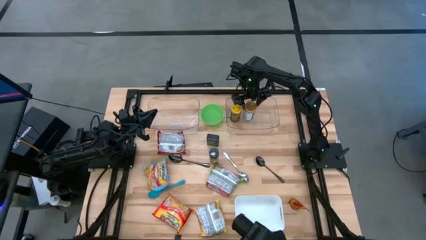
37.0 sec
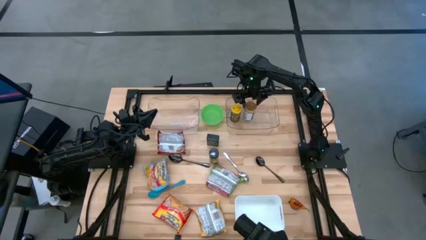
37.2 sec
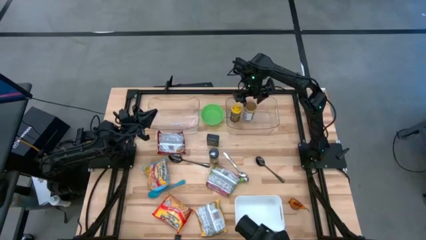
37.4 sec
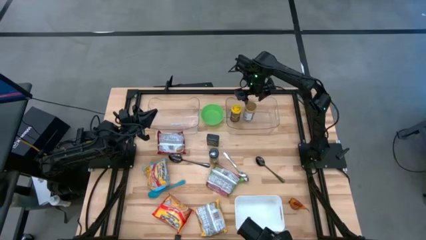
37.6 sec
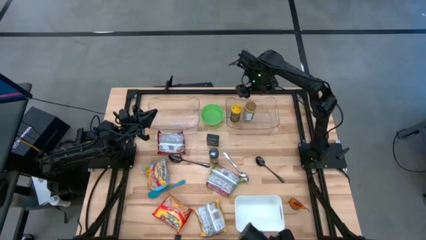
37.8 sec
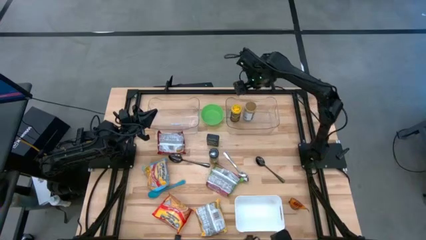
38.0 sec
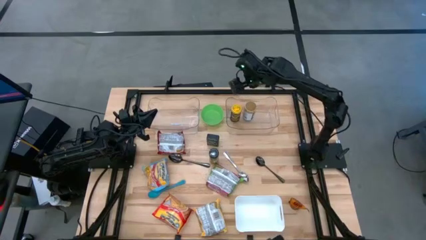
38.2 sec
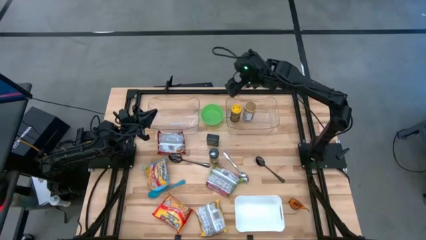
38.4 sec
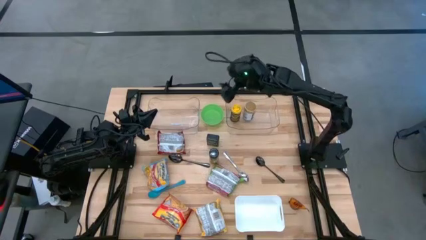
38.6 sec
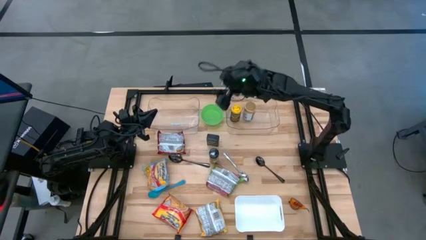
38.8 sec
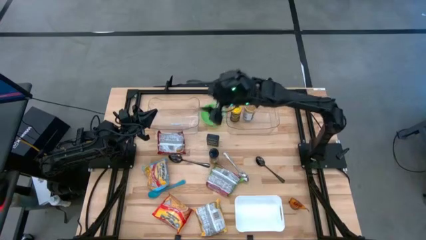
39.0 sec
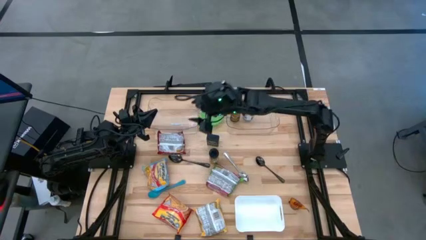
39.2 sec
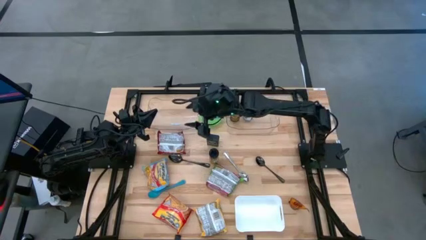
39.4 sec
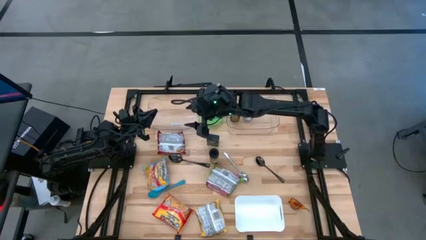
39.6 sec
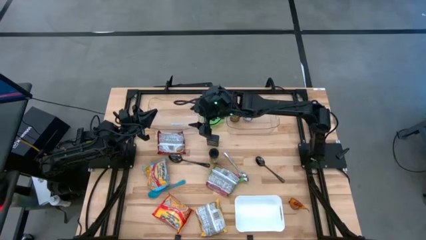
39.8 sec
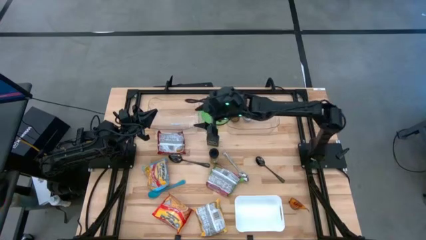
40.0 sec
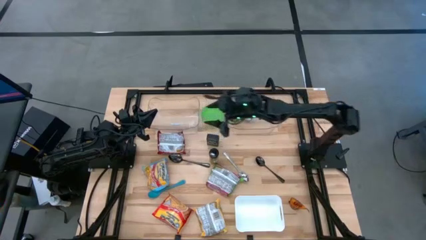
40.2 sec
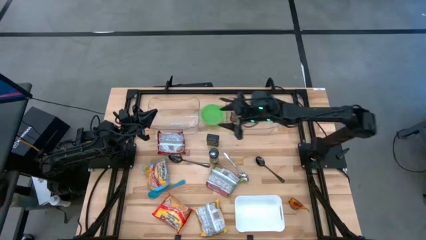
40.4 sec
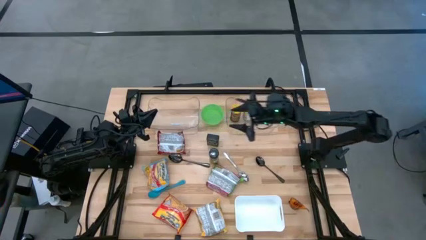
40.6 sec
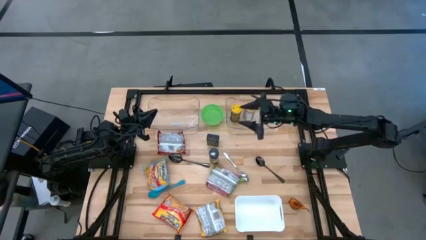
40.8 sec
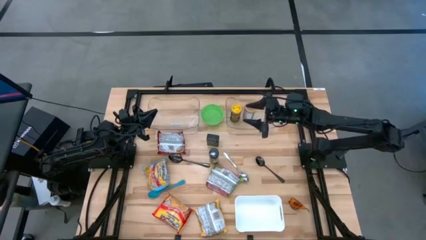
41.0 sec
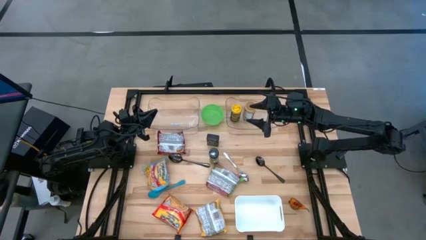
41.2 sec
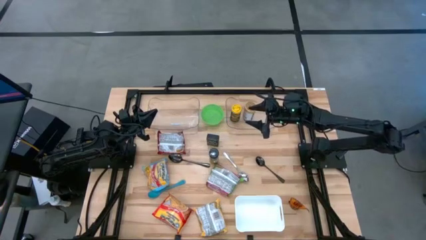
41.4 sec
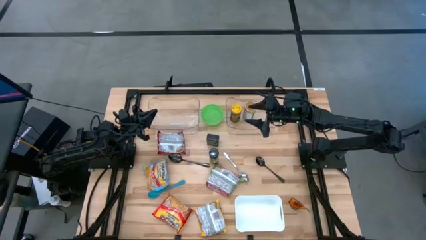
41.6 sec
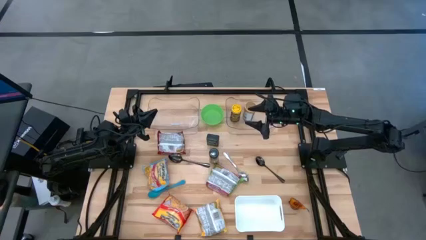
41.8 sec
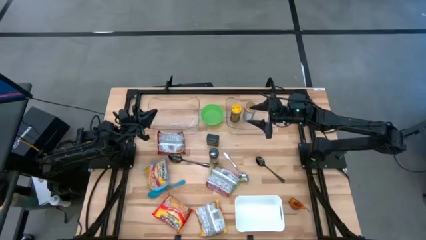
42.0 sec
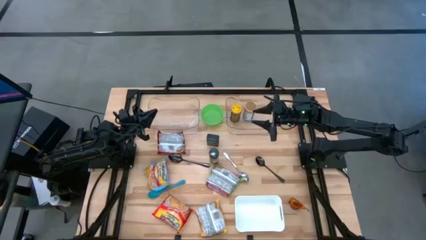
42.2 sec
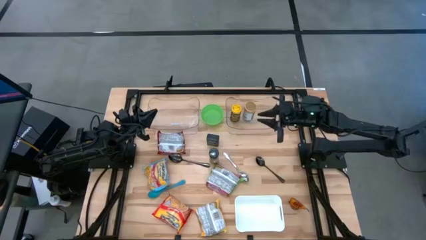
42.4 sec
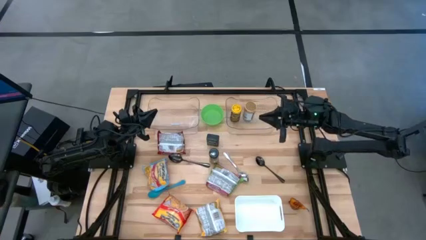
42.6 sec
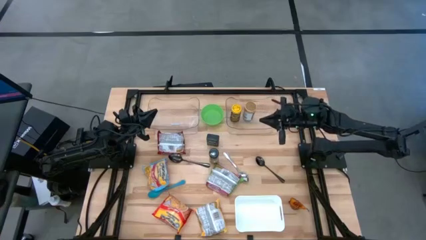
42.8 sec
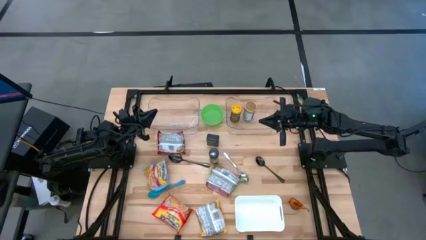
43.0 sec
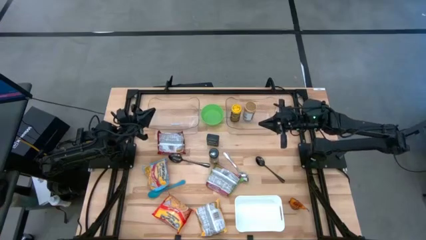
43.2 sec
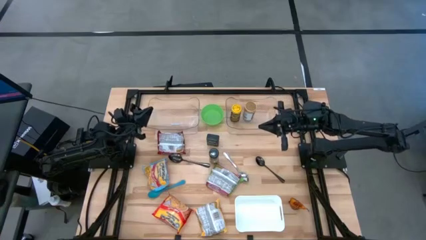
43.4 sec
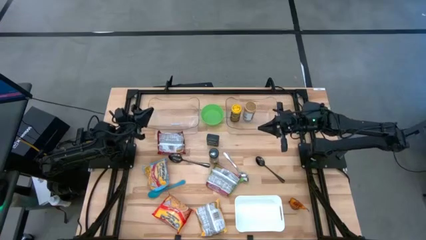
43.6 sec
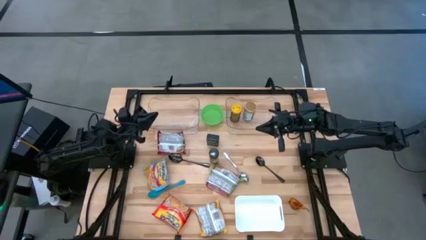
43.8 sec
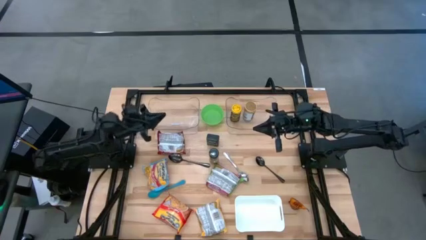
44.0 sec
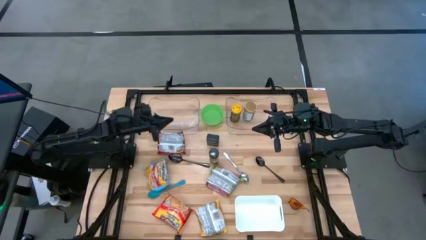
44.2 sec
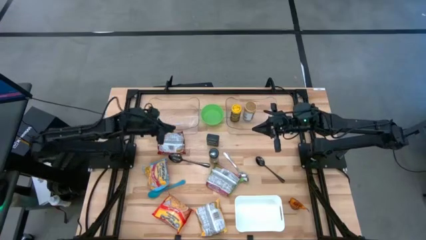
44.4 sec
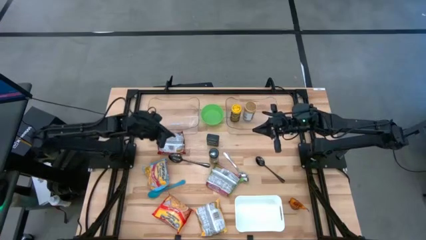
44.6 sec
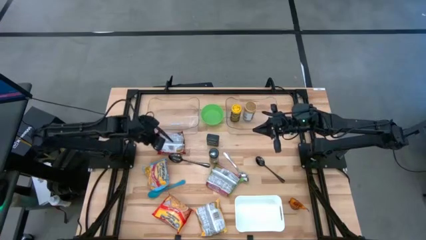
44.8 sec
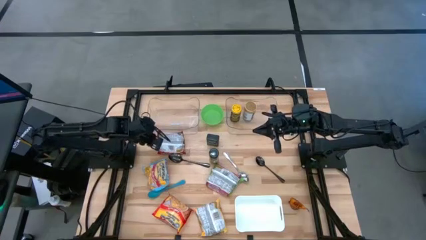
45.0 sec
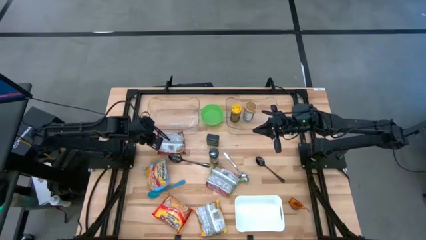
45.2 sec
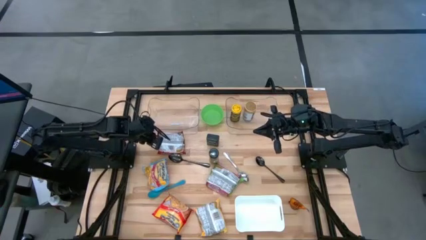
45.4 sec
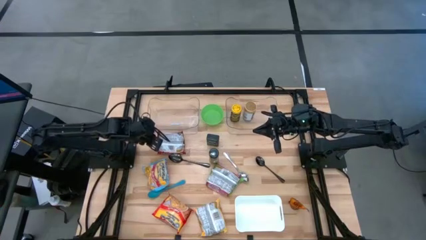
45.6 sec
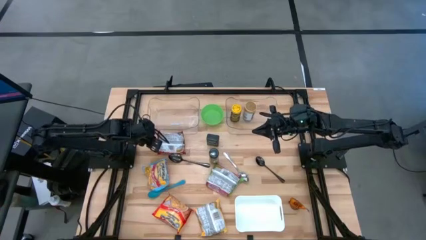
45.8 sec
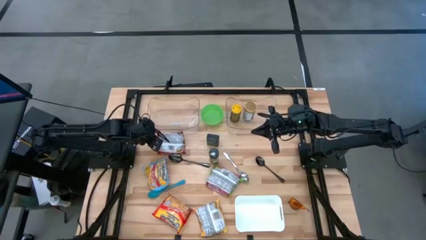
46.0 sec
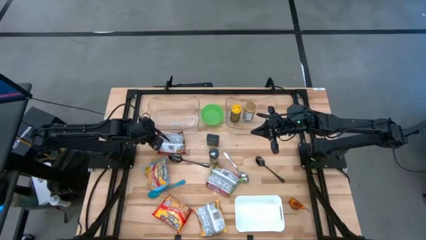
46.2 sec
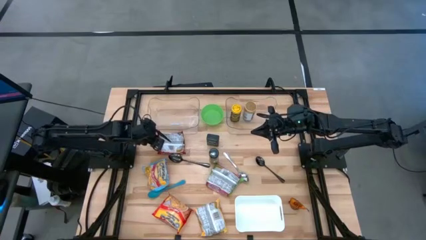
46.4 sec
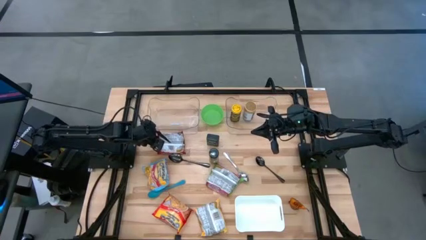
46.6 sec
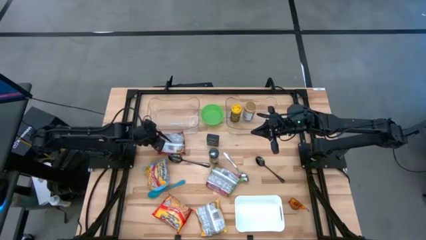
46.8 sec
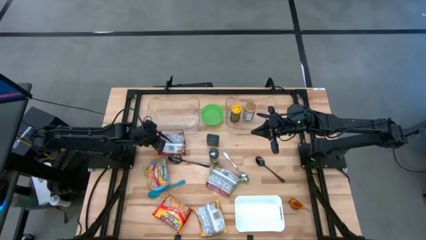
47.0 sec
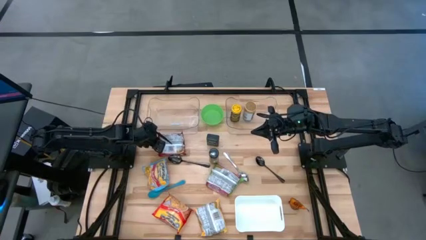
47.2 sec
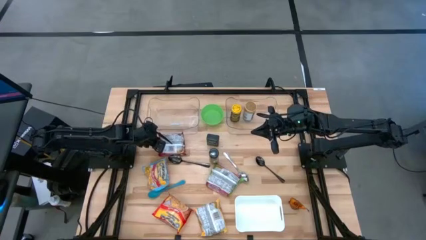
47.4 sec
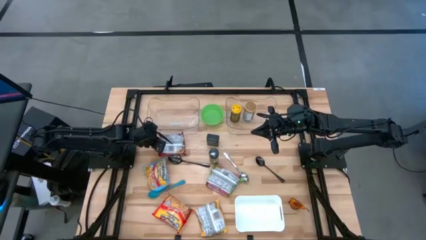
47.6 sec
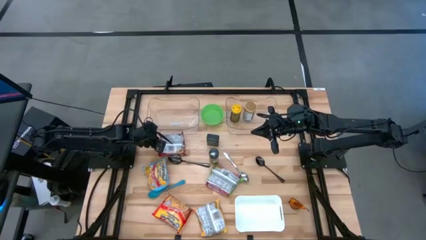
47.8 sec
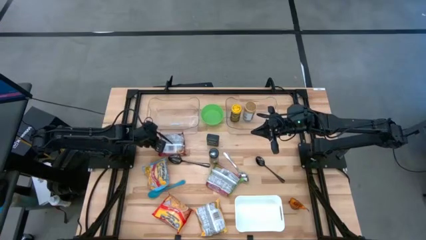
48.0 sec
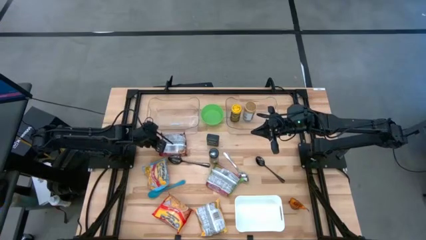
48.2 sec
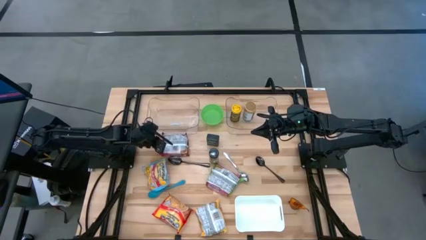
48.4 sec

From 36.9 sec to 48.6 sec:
Task: Pick & Place Food Item
Put the red noodle pack in the left transparent bin

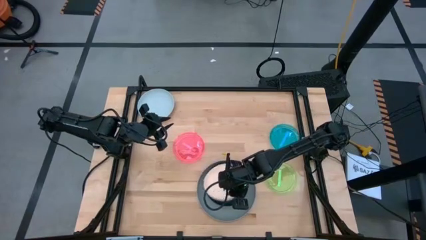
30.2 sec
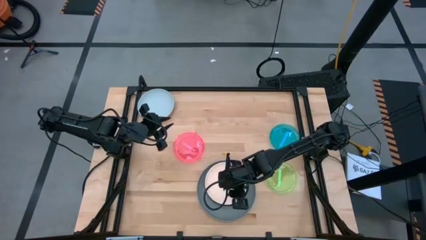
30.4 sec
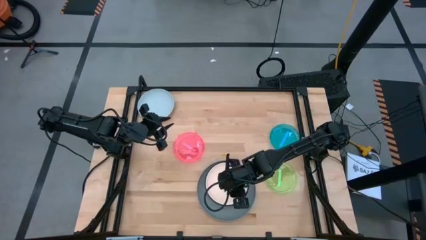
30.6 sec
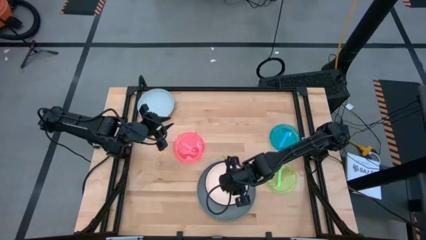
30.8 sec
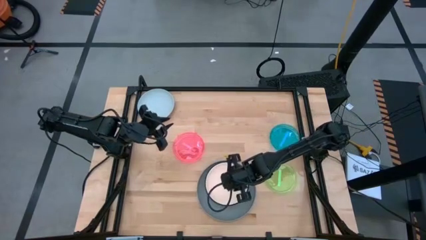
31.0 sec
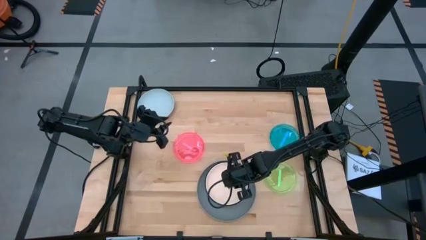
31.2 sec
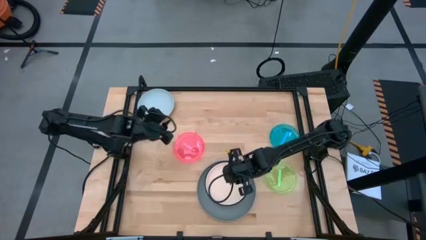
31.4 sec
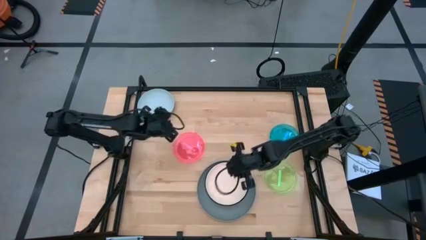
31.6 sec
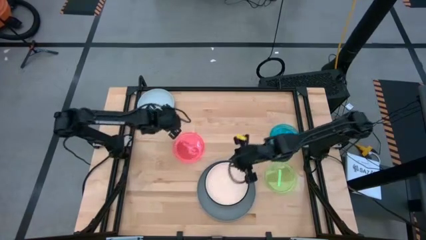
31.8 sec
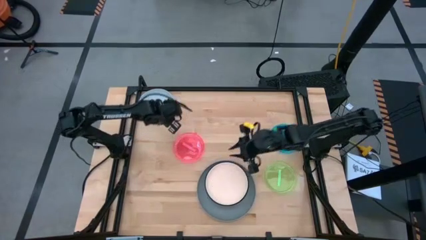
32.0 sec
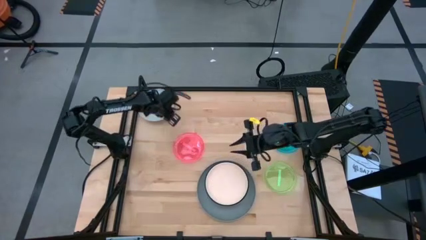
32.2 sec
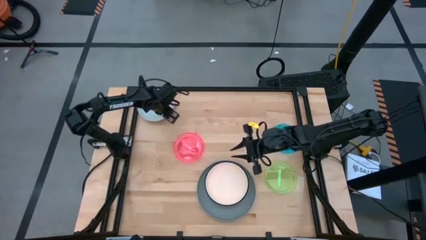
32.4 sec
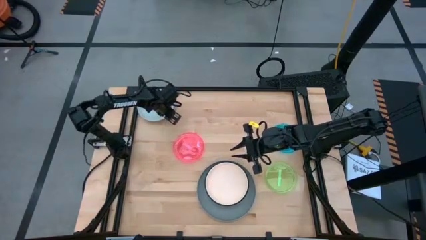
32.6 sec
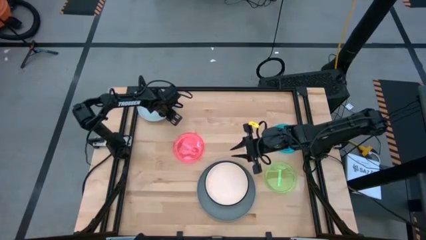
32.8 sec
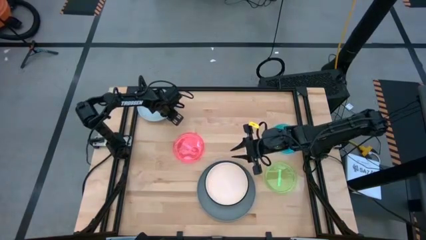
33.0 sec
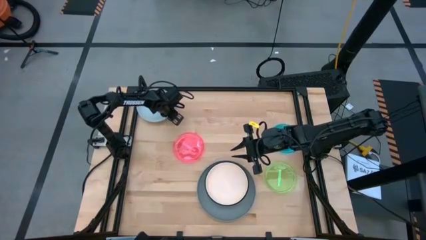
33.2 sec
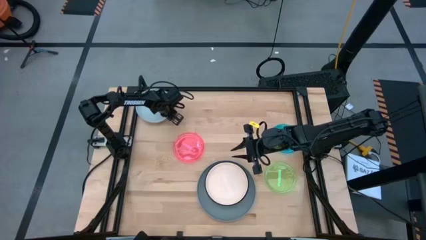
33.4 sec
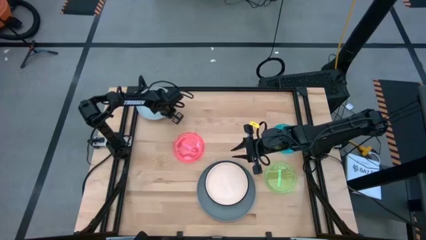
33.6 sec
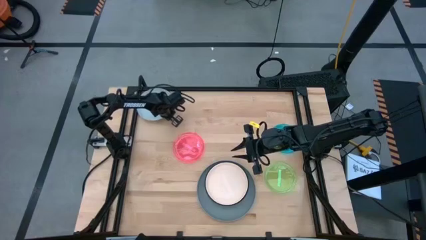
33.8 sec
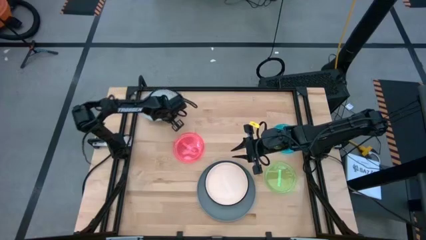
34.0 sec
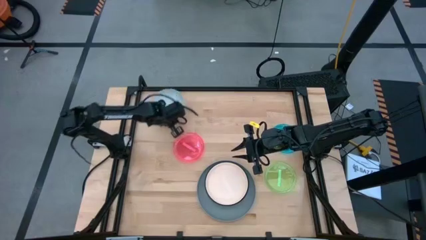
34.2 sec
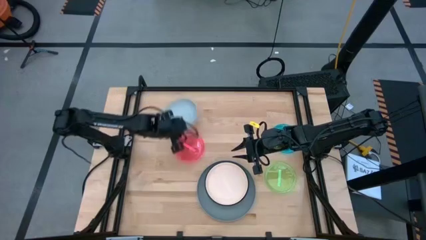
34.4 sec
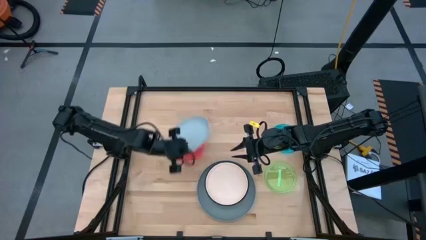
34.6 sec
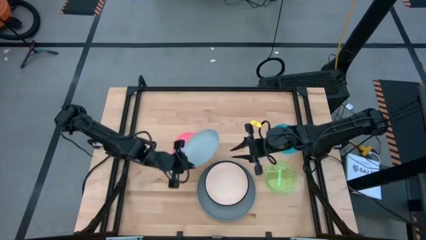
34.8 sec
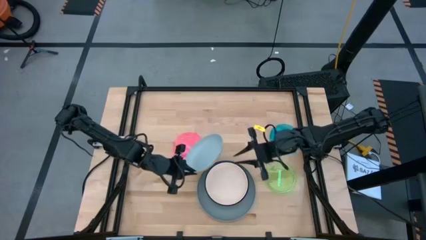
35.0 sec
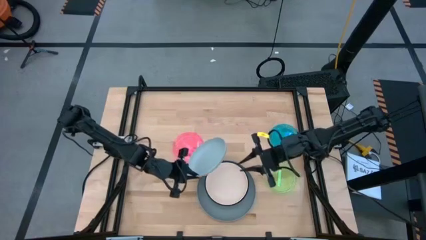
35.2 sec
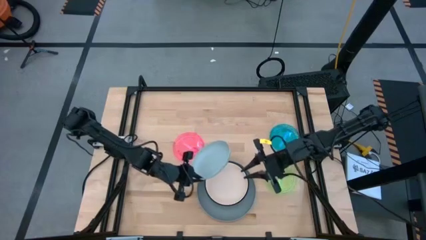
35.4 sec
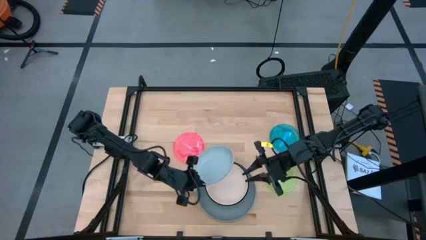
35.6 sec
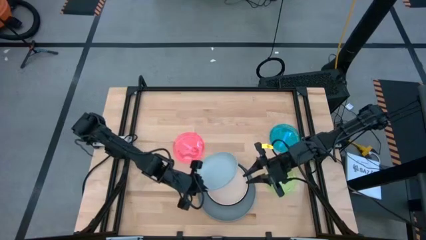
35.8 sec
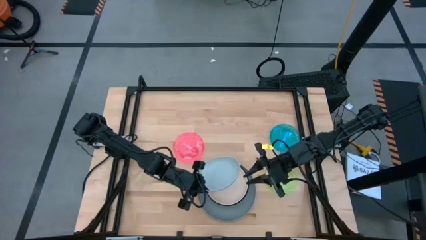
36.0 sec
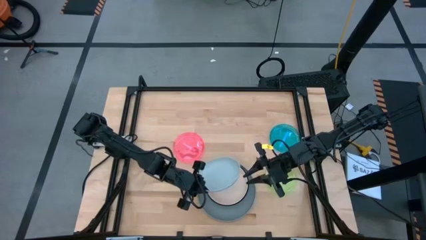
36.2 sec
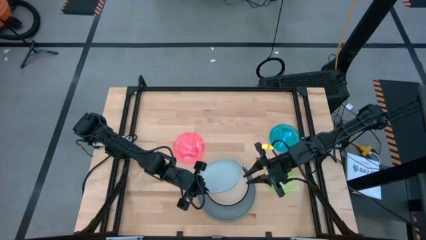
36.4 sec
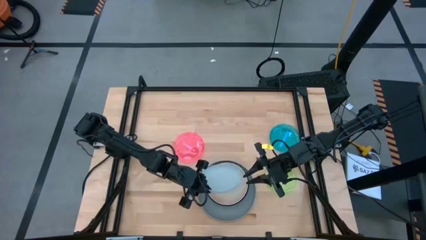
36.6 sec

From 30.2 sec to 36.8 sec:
Task: Stack plastic plates
Stack the light blue plate on top of the light orange plate
